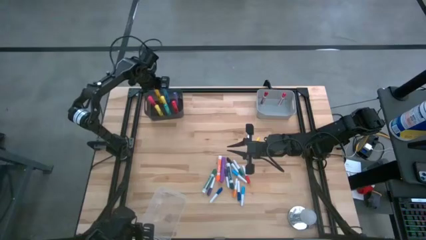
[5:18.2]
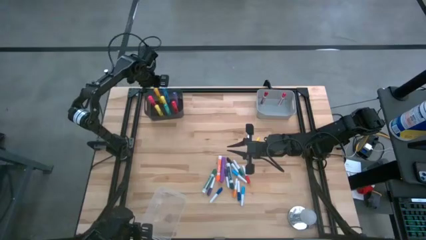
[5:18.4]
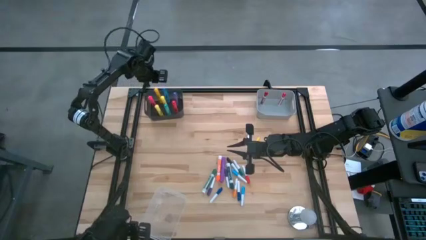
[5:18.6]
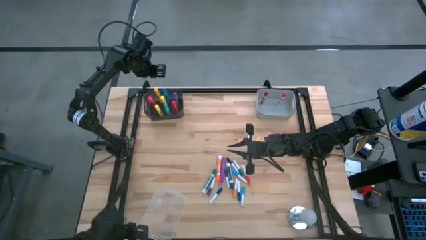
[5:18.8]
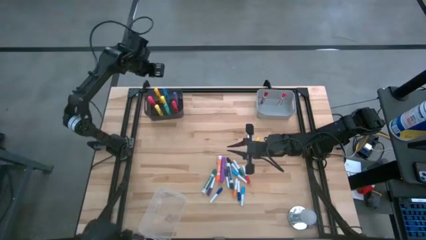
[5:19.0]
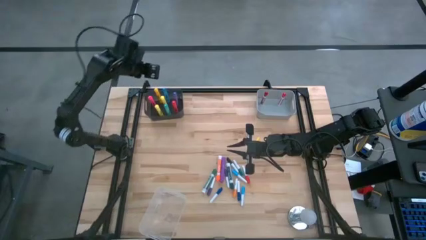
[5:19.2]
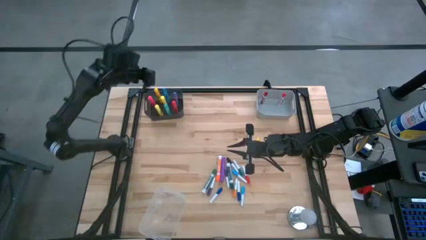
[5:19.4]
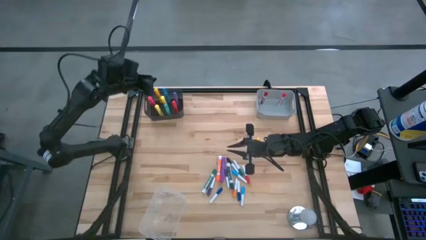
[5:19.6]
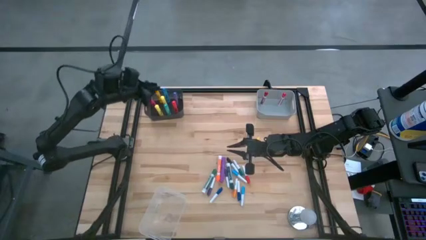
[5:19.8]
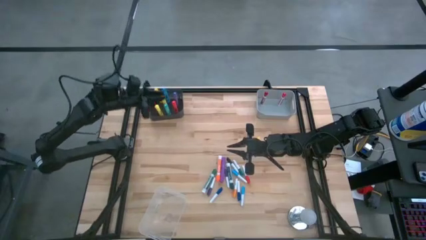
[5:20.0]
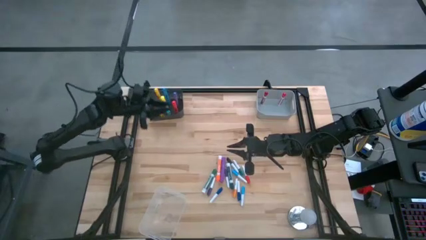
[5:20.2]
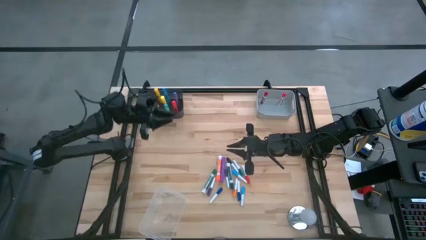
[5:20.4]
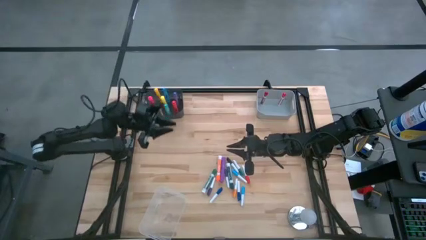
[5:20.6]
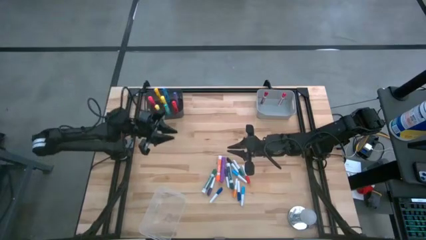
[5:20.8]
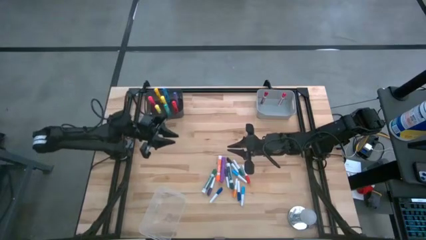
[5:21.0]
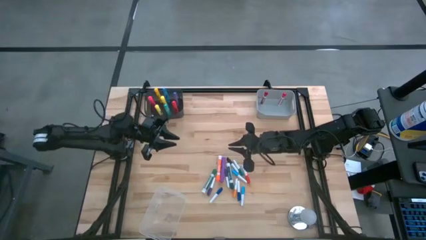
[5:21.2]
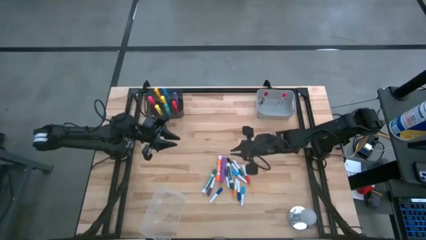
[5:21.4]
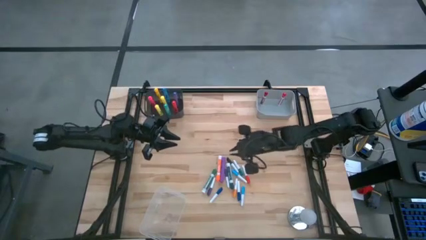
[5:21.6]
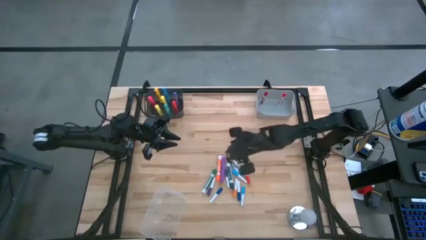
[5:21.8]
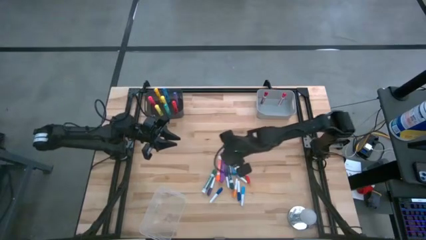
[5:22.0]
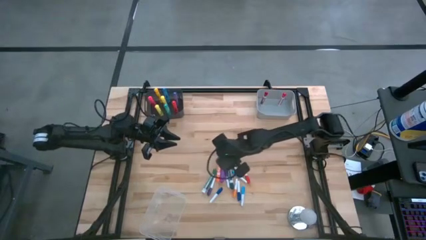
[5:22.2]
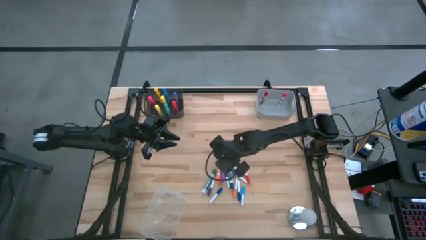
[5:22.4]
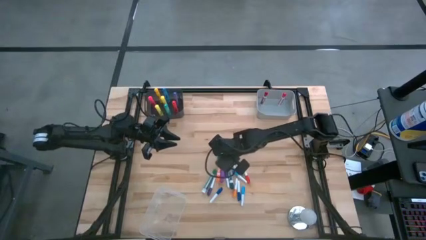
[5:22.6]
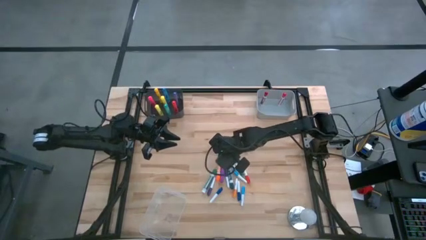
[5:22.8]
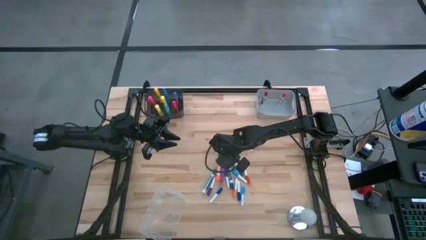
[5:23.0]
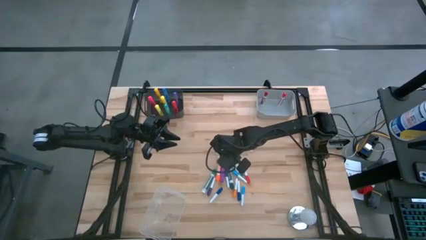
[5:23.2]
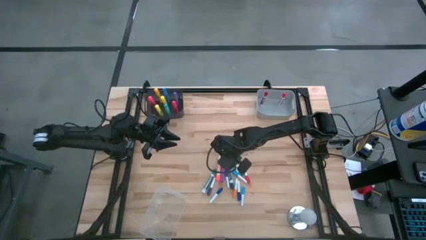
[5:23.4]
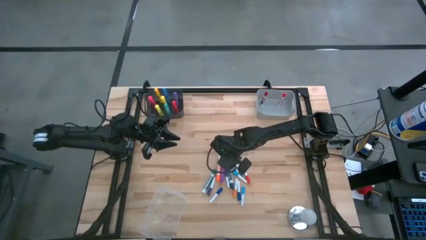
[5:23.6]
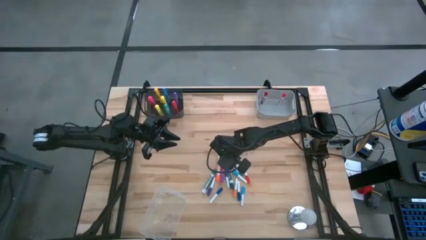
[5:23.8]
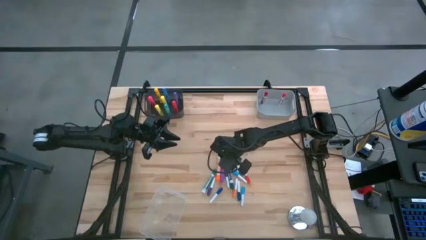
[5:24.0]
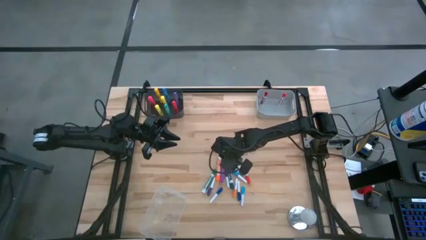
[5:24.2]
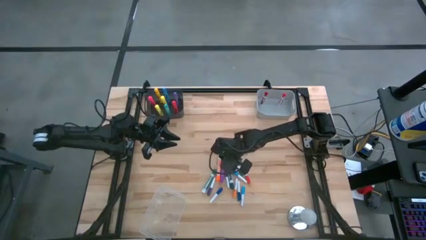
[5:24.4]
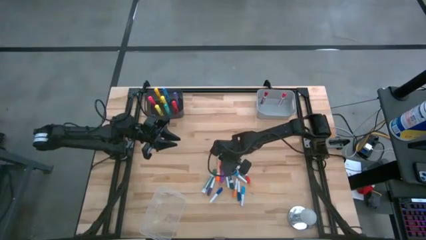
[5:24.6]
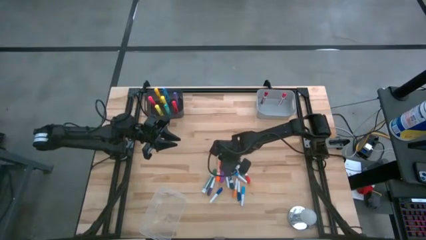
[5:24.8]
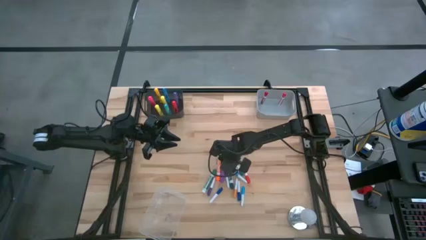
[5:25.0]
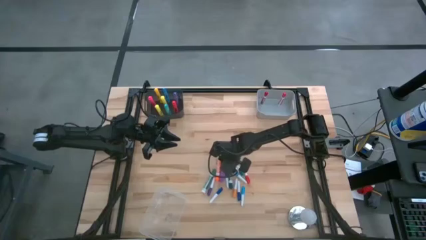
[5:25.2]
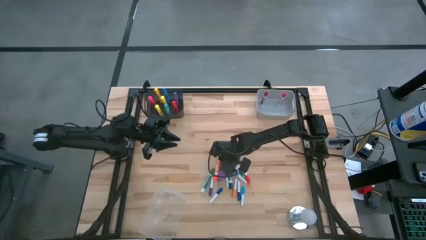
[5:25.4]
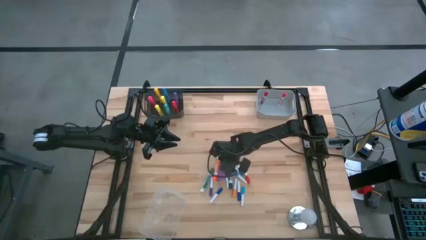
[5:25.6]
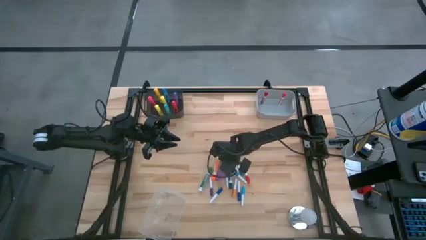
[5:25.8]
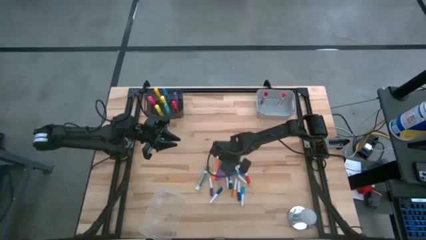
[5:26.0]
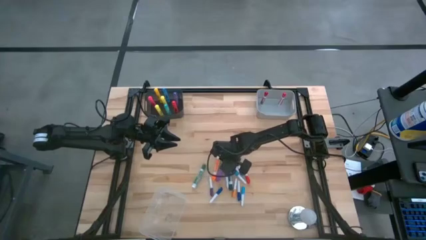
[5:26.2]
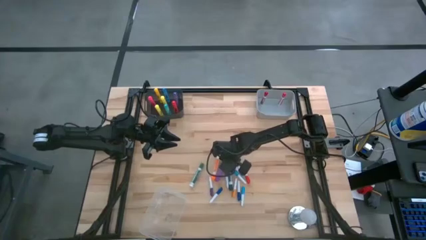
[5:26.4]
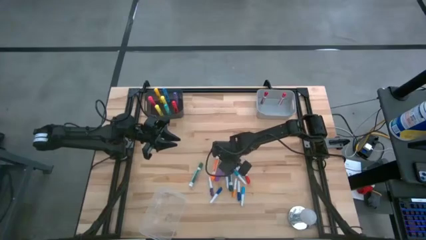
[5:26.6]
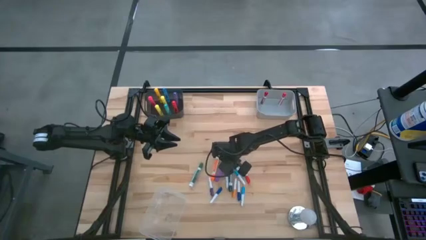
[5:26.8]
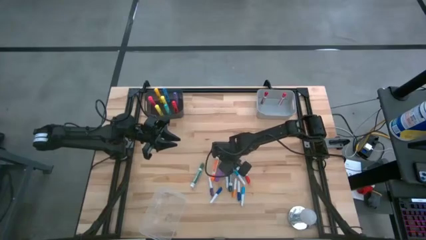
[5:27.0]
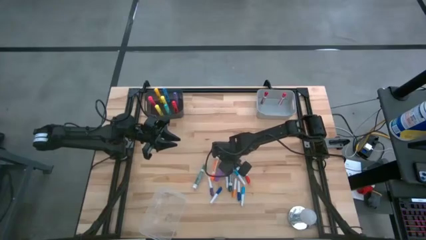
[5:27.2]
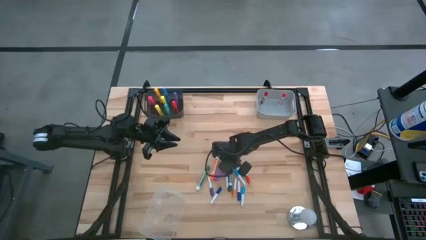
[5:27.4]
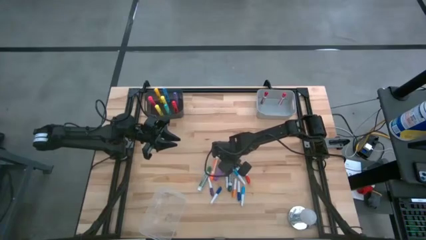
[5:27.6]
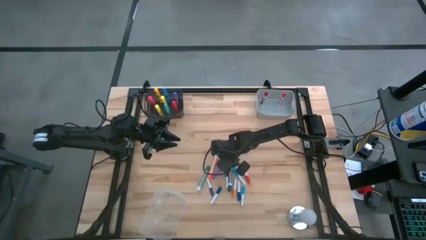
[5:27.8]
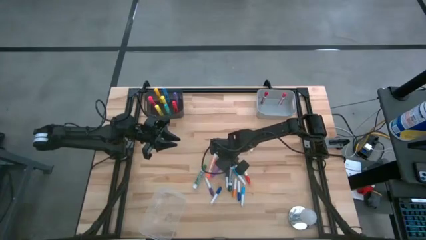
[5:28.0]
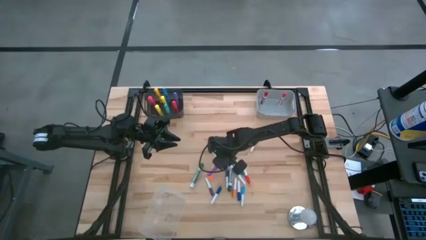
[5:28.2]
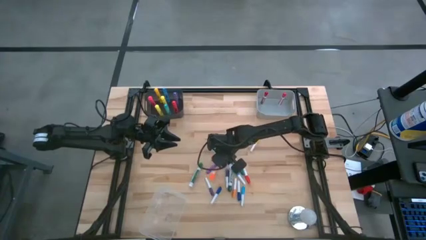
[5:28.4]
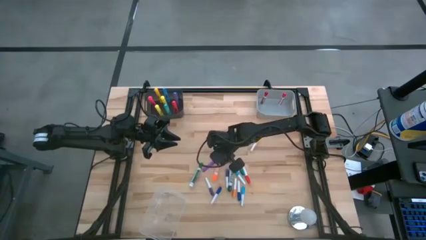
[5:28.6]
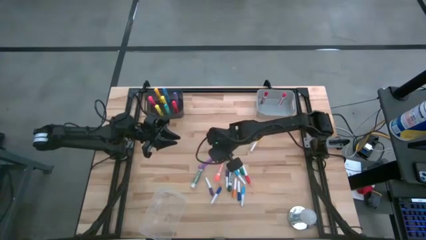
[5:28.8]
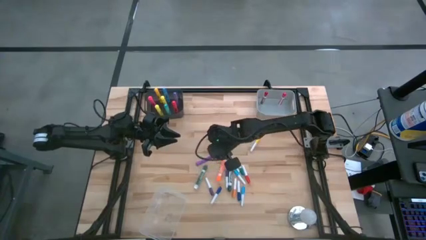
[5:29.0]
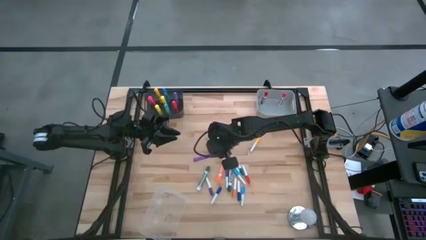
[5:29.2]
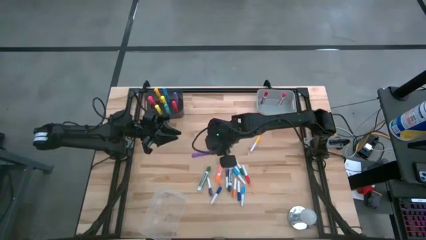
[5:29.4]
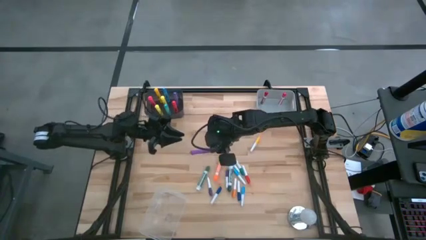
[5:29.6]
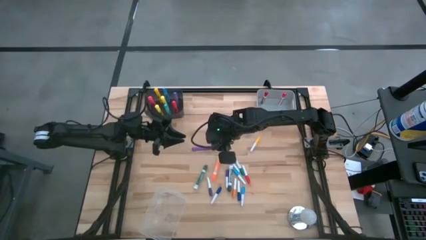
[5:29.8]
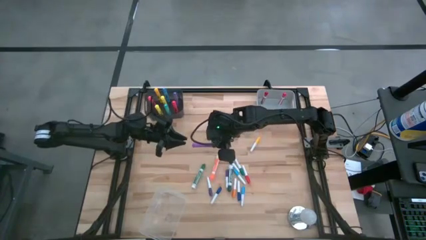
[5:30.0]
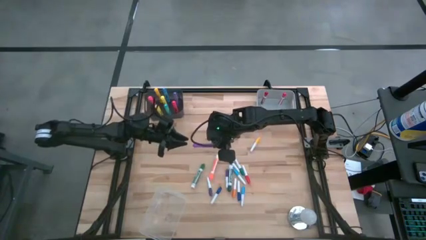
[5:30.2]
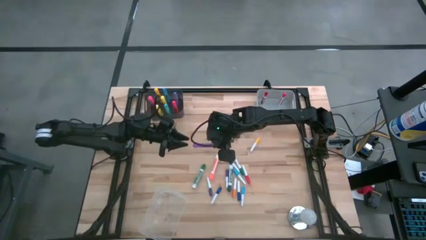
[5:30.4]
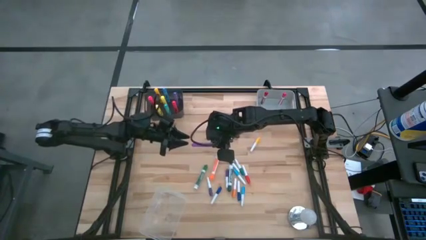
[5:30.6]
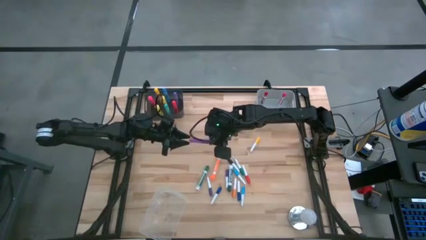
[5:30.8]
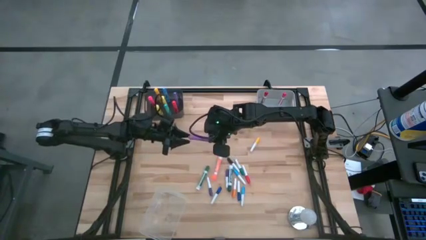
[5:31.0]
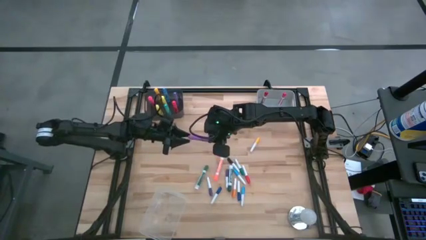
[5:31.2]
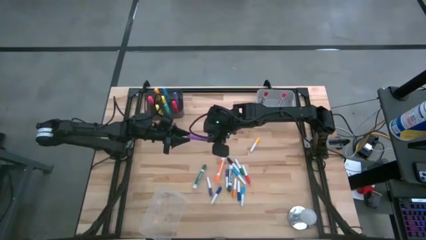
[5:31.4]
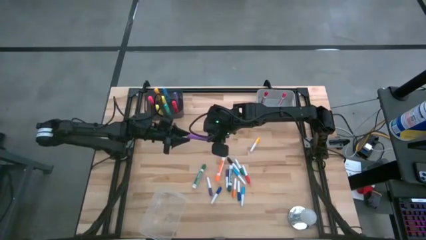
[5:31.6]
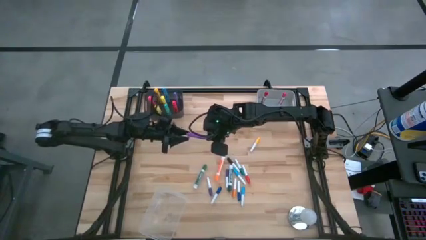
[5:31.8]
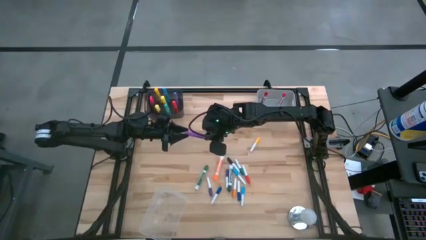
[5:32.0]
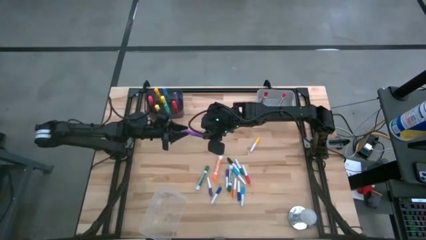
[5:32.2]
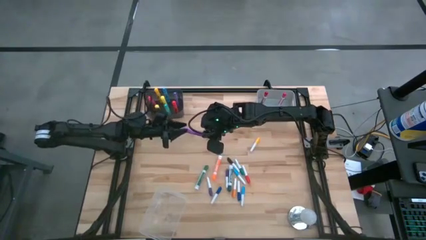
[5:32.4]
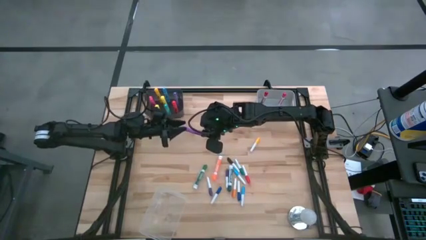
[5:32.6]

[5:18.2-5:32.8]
Task: Pick & Place Markers
Put the violet highlighter pen into the black bin
